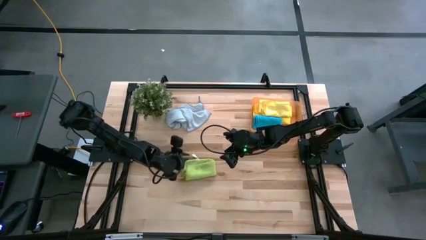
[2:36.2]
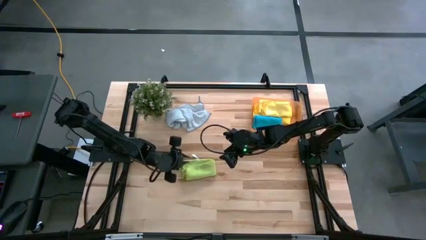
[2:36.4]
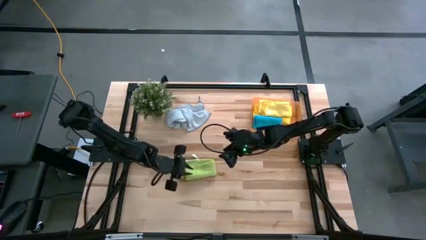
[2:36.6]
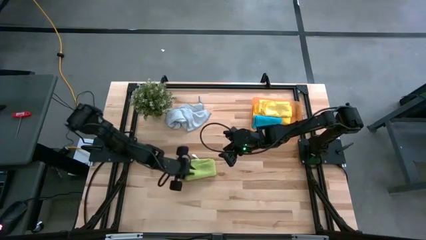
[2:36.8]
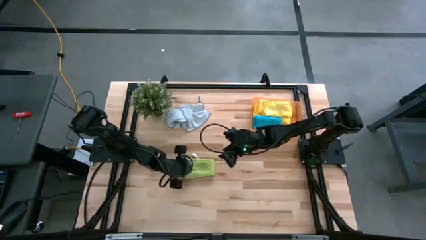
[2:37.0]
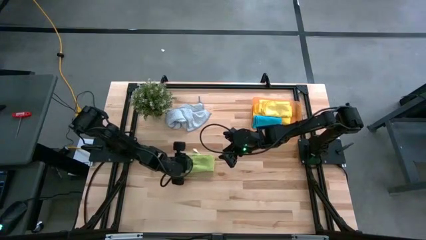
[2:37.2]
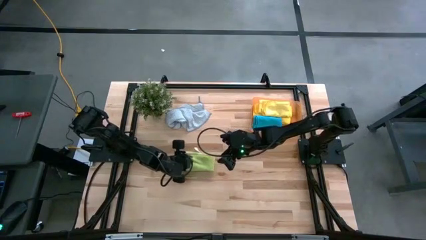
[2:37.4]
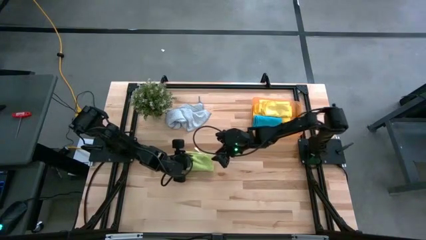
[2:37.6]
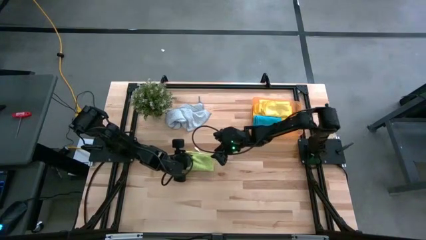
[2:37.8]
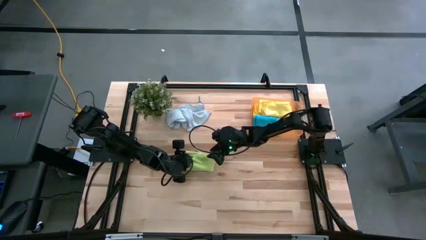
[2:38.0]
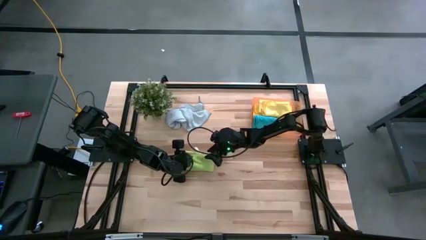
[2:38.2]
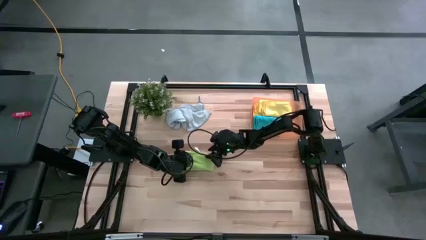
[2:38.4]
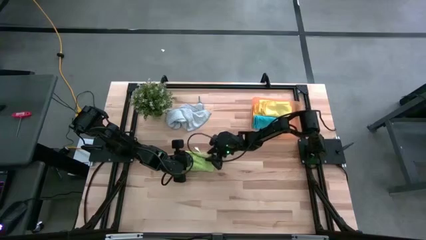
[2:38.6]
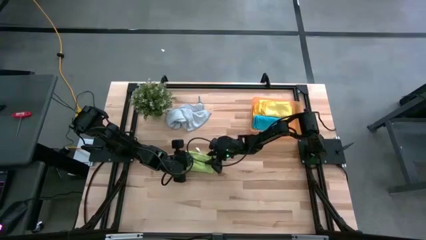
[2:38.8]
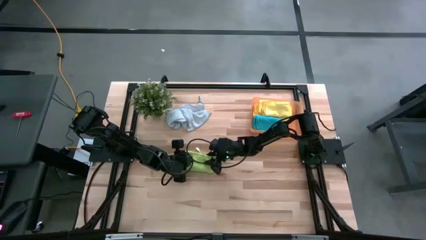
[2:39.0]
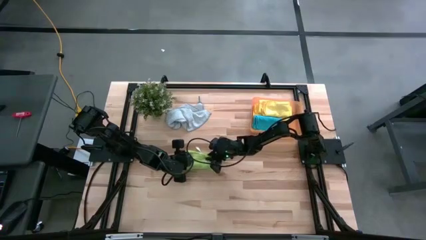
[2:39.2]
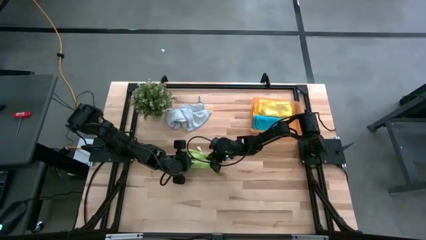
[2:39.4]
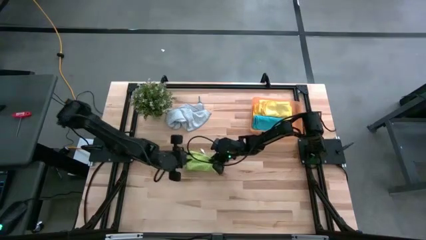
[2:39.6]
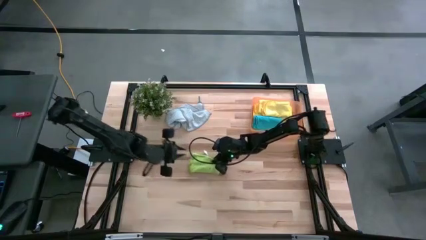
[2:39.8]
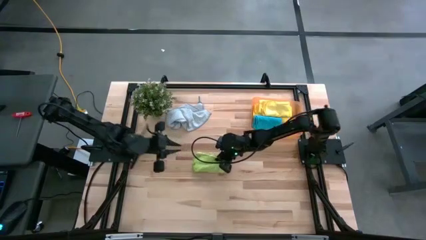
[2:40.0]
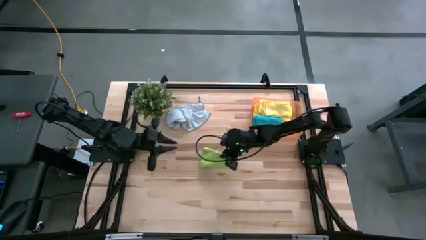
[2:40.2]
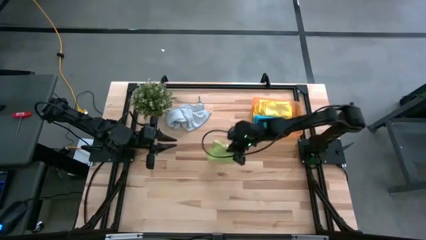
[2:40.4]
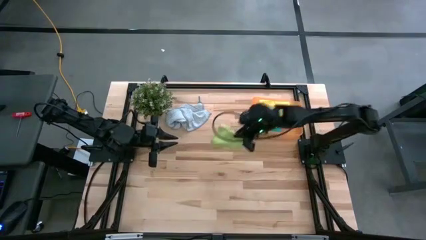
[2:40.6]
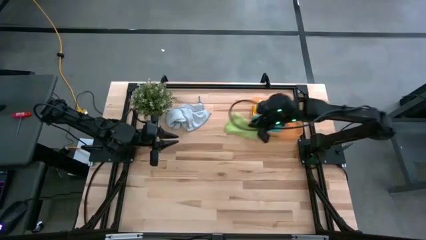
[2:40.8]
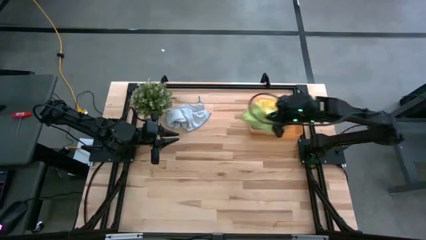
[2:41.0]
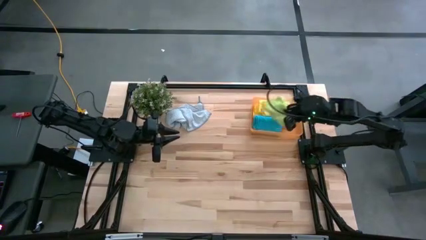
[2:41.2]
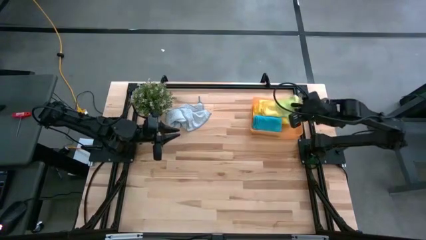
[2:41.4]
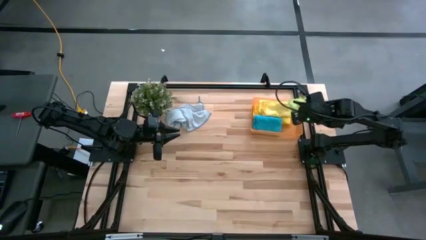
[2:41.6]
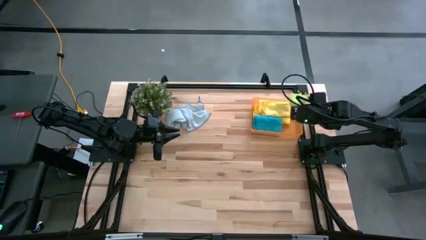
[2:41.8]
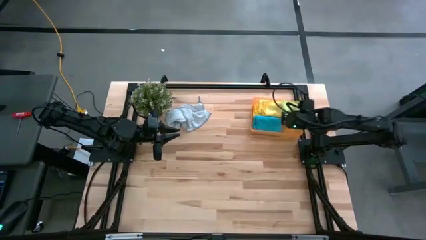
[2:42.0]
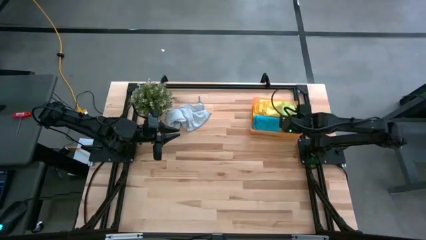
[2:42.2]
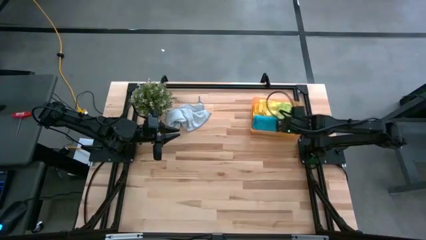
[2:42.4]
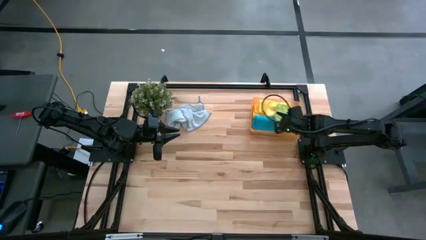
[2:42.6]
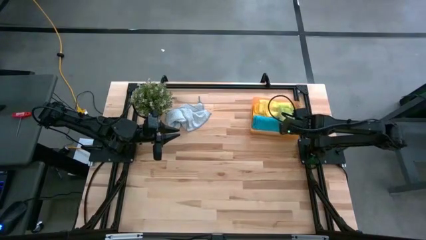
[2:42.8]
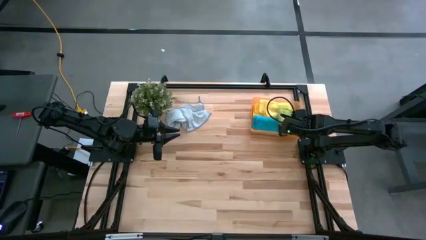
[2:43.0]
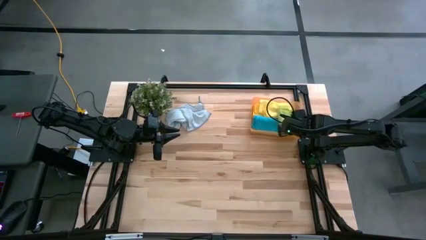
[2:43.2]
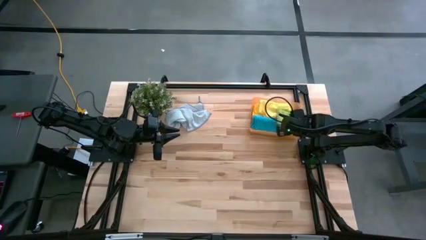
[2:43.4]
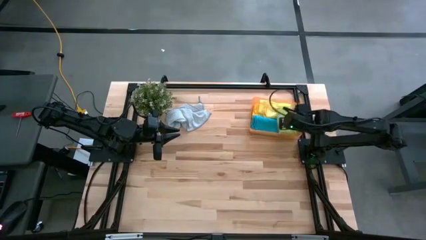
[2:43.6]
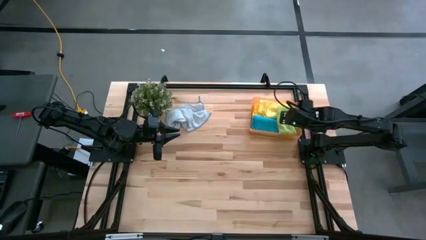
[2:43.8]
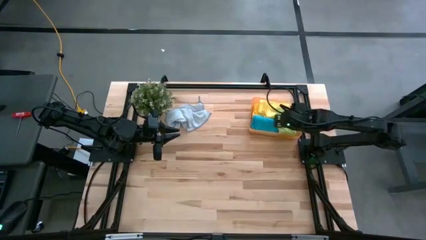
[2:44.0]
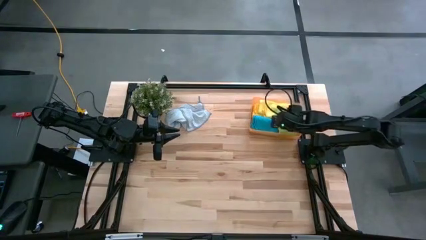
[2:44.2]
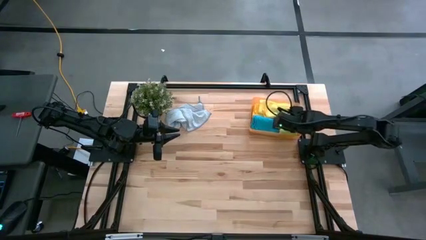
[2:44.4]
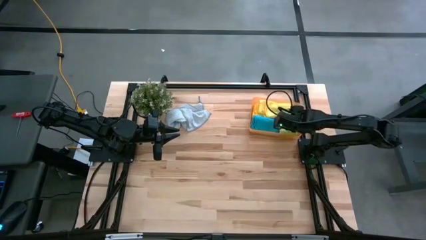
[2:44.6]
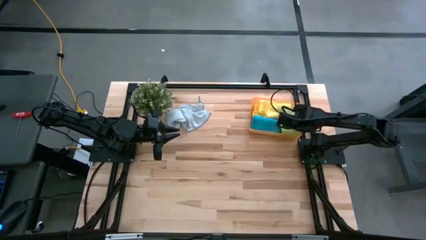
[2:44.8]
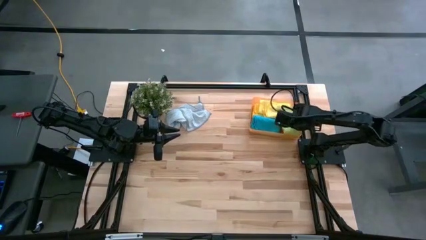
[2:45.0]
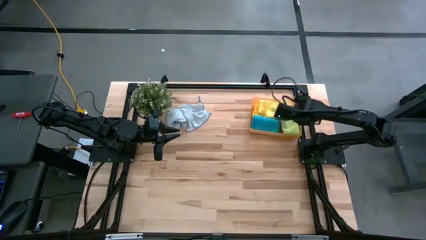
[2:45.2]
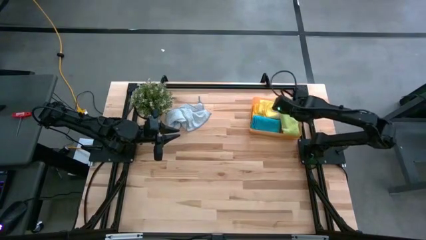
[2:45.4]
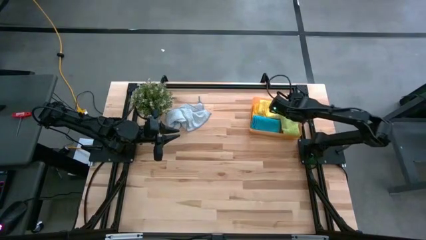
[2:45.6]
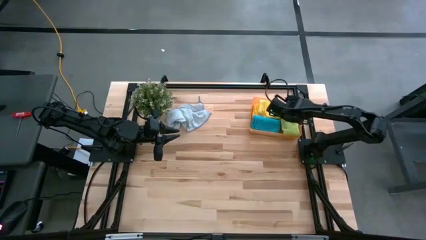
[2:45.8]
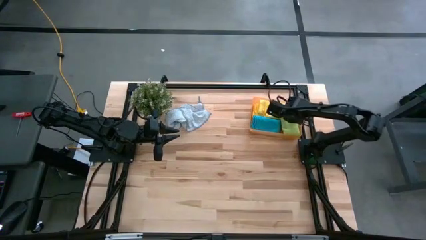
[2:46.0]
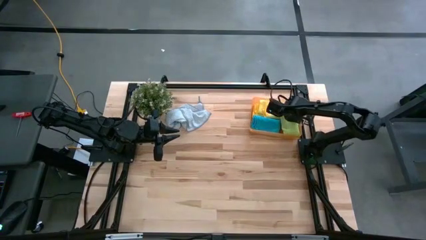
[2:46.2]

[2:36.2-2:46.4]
Task: Fold microfiber towels
Put the green microfiber cloth into the orange bin

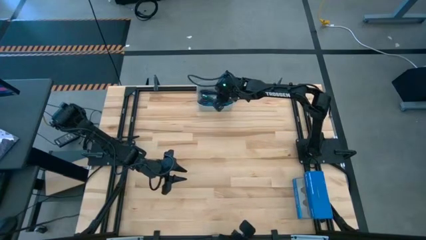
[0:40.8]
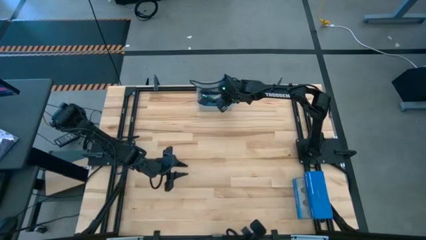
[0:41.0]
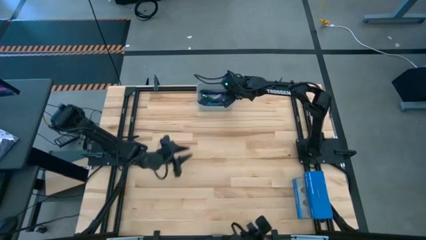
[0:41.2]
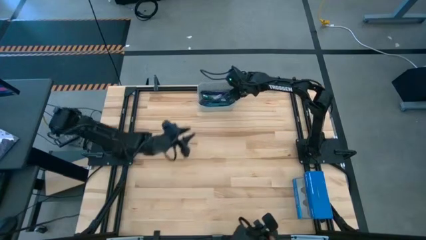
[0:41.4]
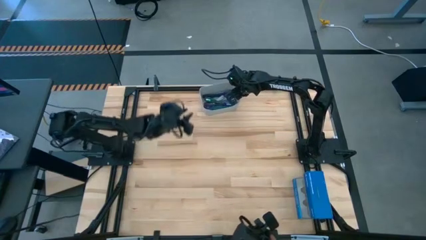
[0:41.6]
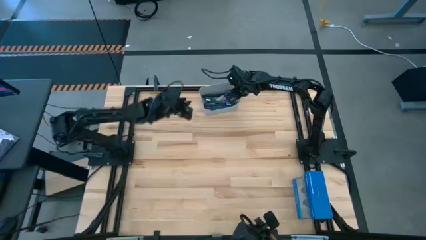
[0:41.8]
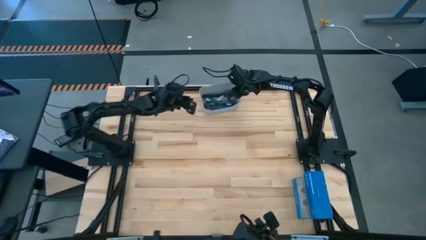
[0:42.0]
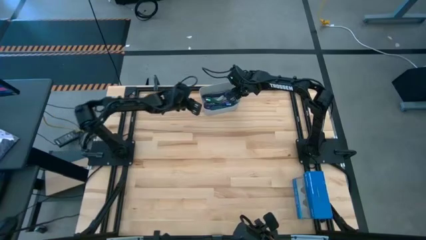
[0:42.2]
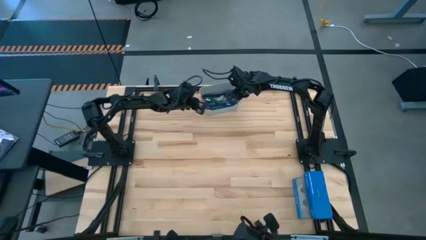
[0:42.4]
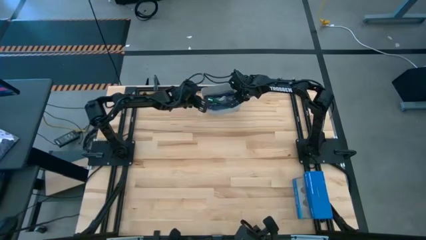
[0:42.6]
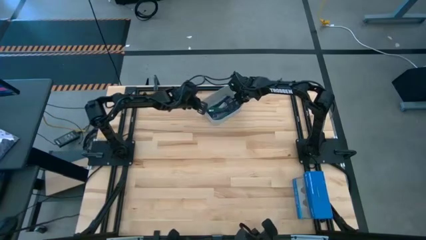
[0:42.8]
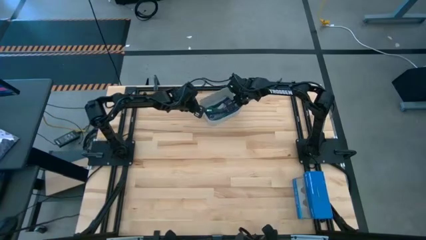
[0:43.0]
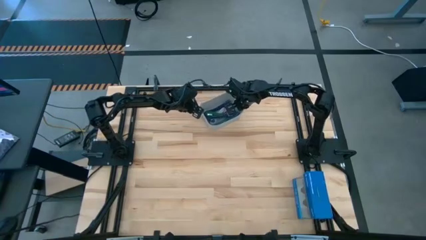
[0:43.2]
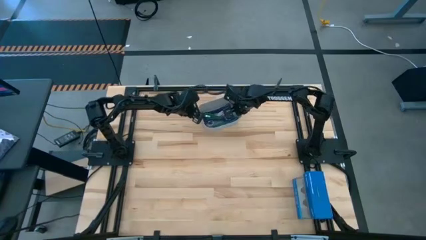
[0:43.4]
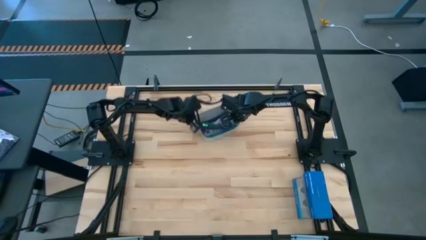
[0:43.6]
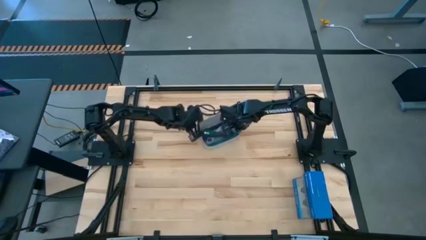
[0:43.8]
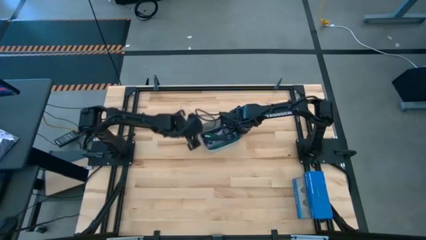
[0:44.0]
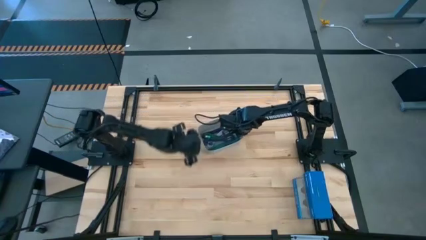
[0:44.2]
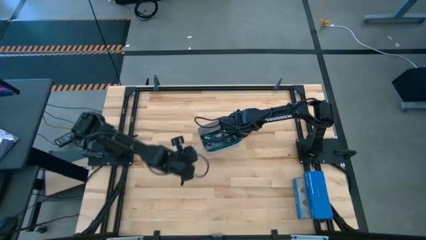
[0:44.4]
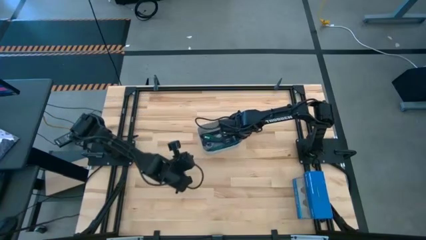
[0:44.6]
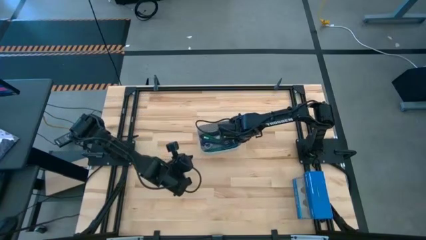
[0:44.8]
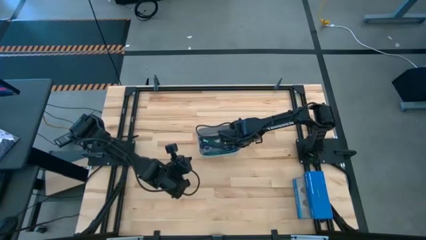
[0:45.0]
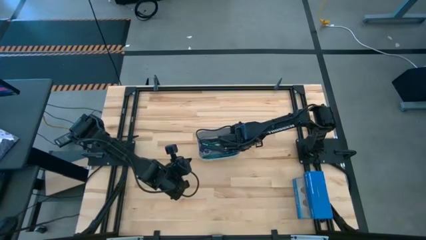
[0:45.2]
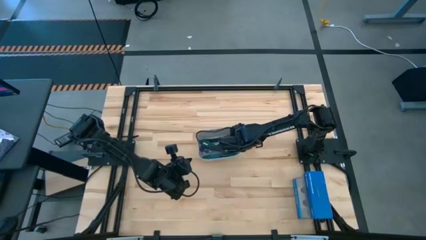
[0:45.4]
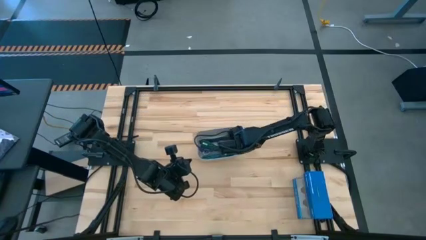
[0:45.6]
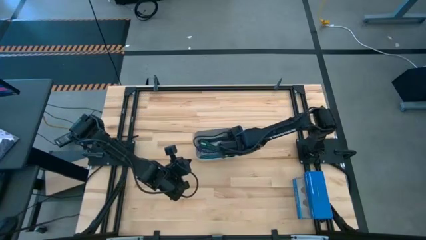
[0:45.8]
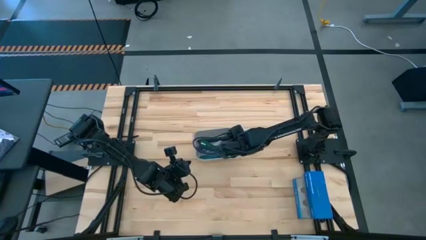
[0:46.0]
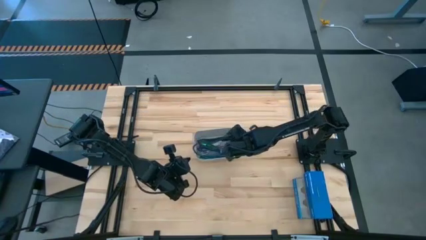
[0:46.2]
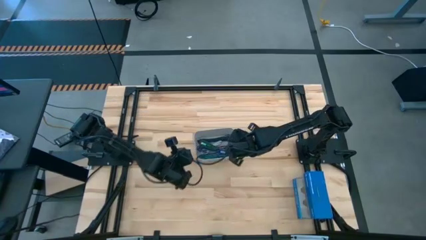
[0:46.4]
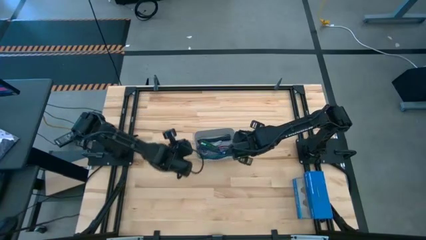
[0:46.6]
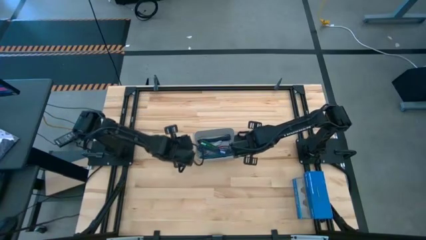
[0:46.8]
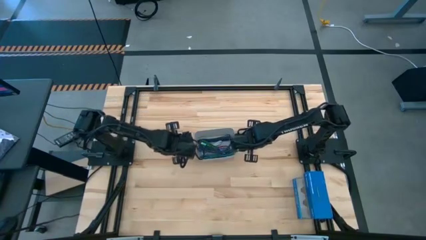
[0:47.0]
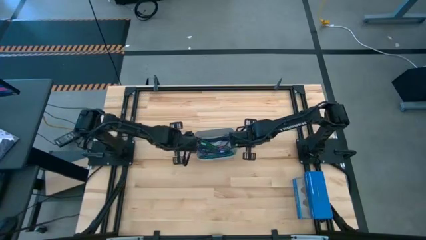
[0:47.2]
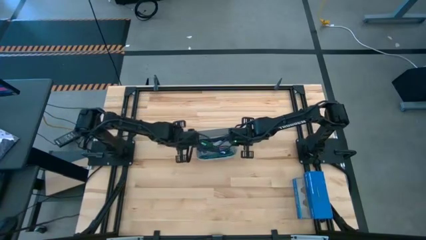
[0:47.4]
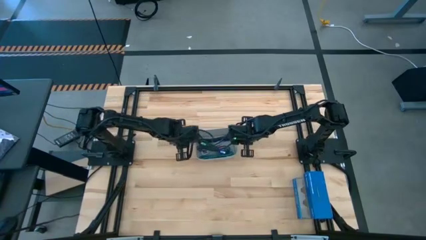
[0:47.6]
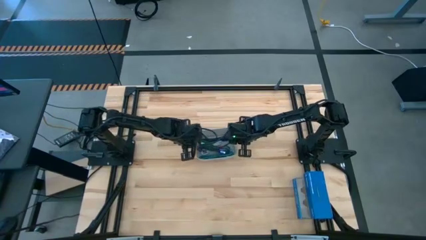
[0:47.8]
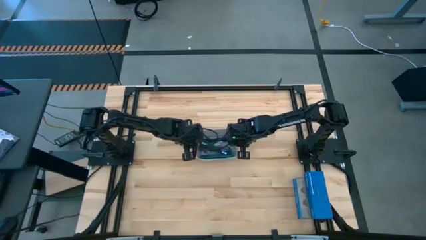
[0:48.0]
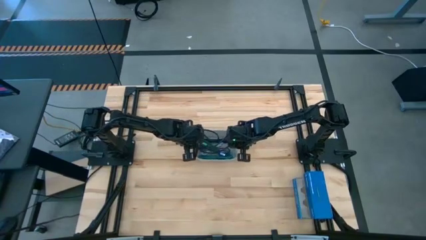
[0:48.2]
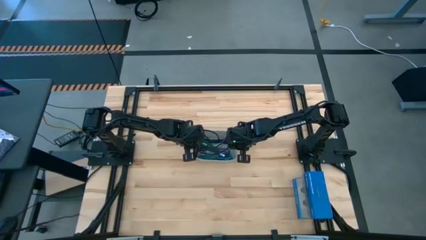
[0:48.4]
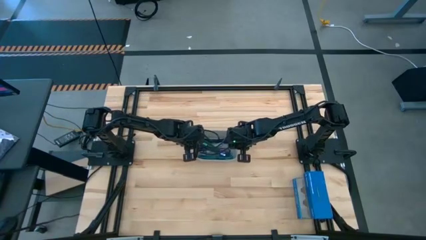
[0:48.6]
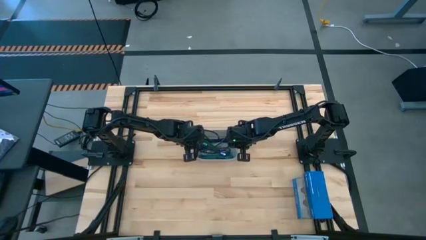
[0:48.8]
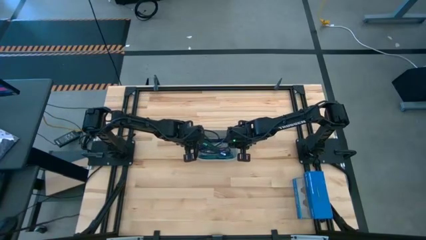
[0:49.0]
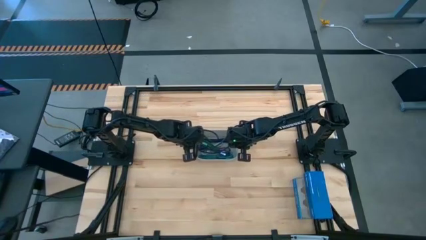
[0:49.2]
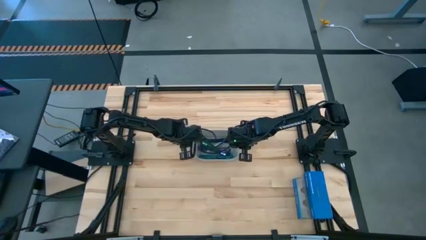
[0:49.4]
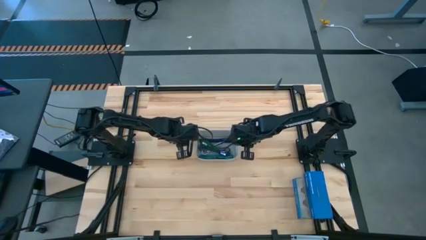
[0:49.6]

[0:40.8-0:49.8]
Task: Pick and place USB-C Cables
Move the bin to the center of the table
